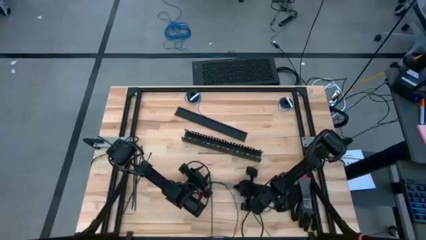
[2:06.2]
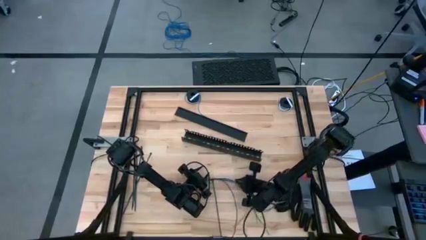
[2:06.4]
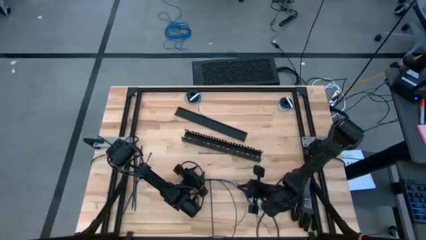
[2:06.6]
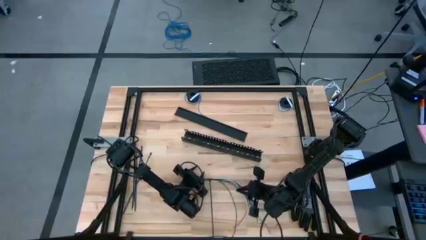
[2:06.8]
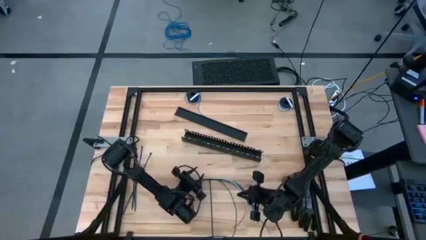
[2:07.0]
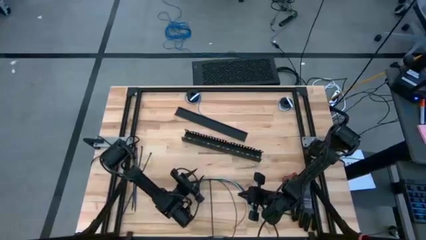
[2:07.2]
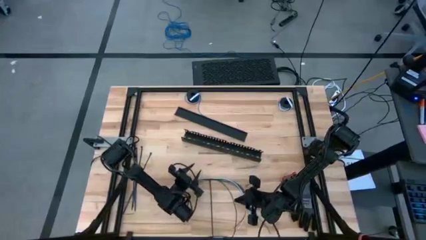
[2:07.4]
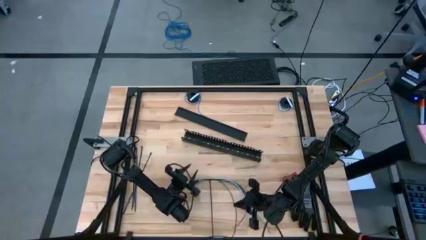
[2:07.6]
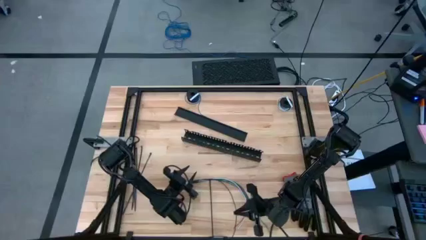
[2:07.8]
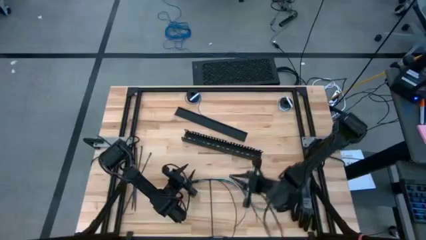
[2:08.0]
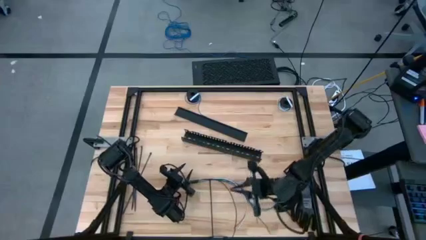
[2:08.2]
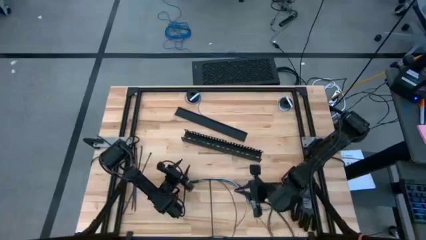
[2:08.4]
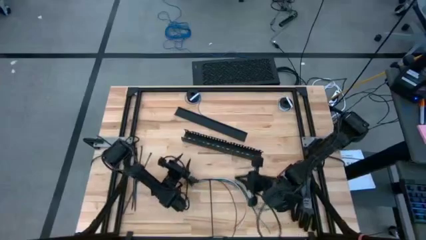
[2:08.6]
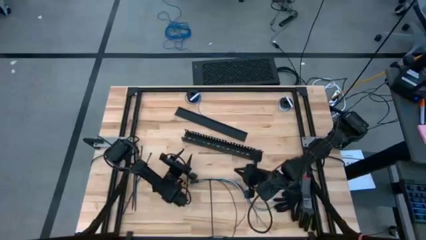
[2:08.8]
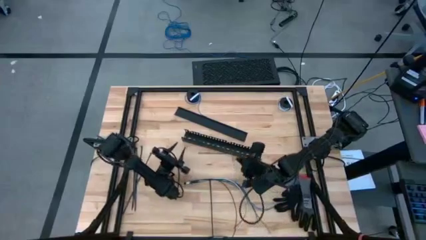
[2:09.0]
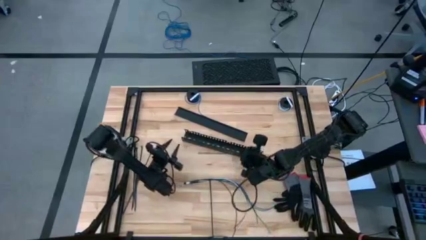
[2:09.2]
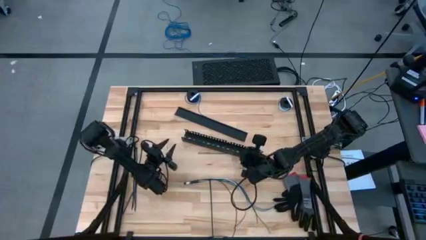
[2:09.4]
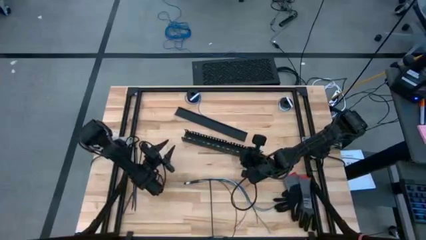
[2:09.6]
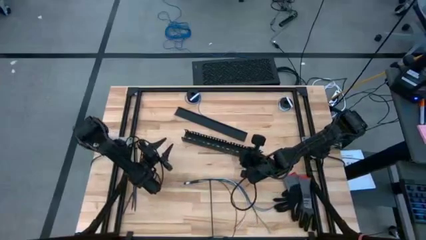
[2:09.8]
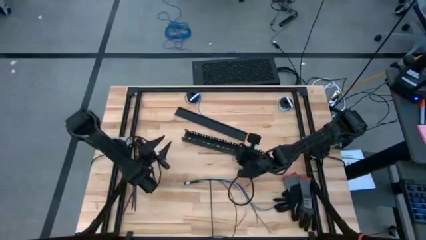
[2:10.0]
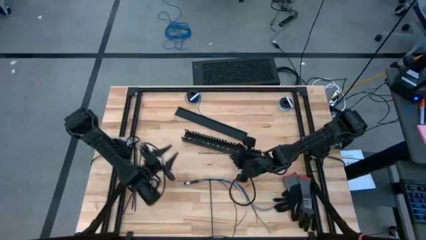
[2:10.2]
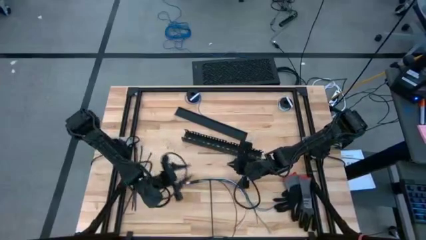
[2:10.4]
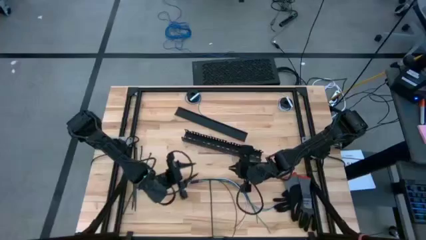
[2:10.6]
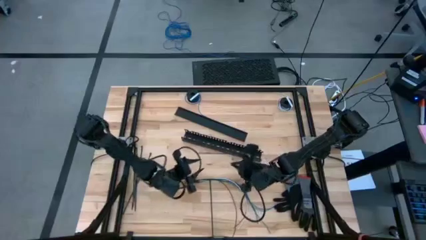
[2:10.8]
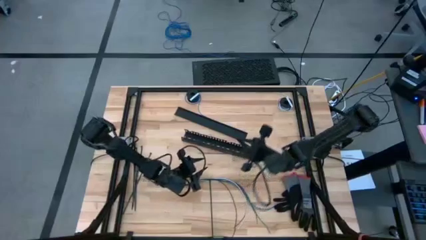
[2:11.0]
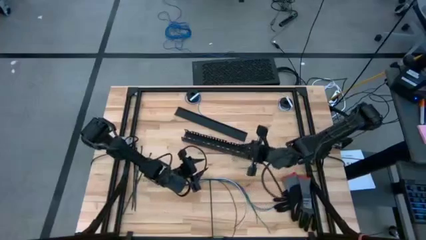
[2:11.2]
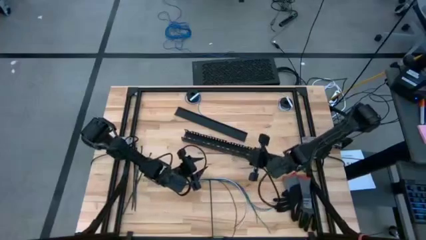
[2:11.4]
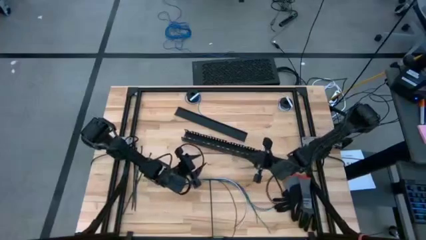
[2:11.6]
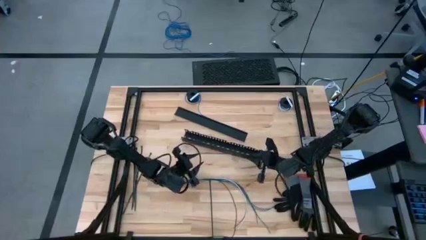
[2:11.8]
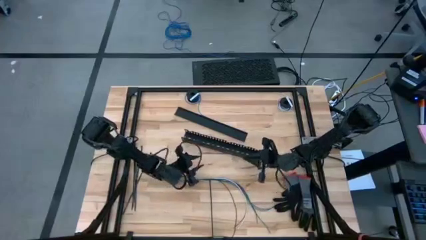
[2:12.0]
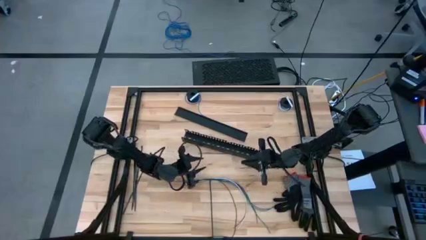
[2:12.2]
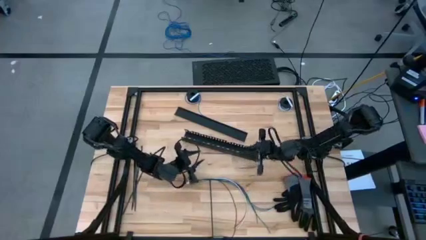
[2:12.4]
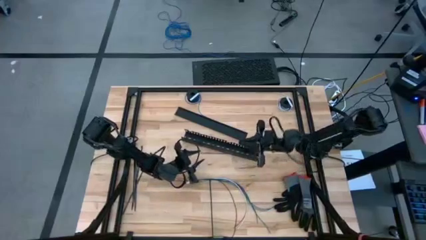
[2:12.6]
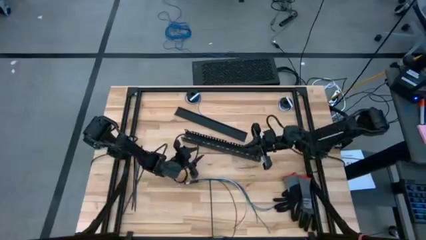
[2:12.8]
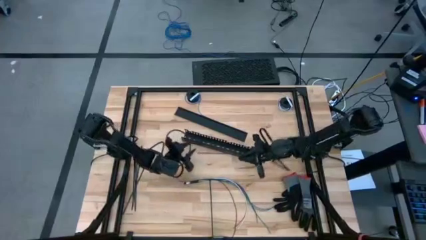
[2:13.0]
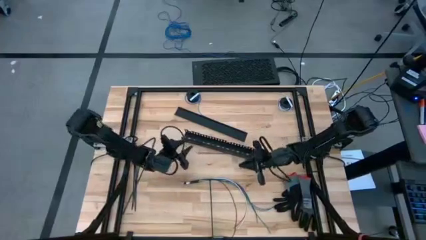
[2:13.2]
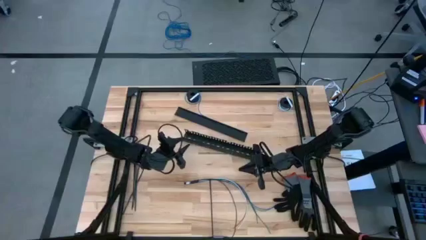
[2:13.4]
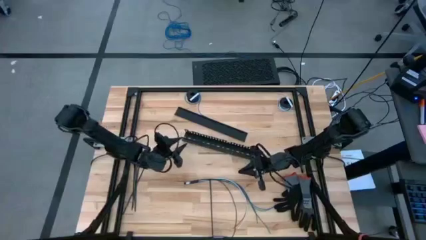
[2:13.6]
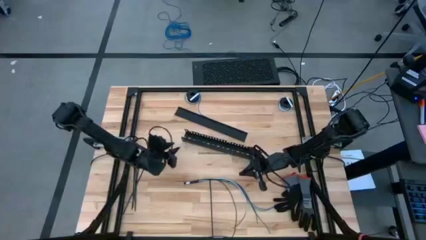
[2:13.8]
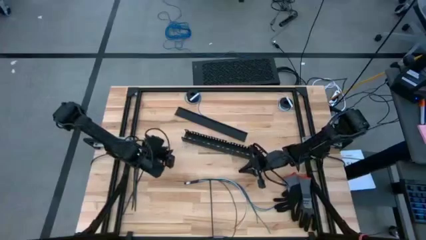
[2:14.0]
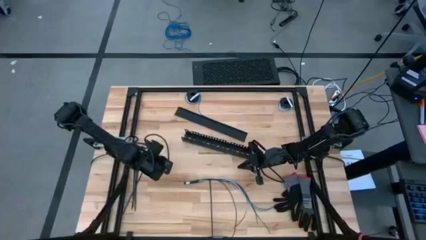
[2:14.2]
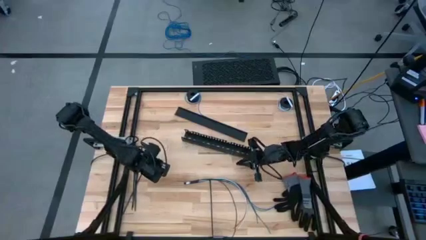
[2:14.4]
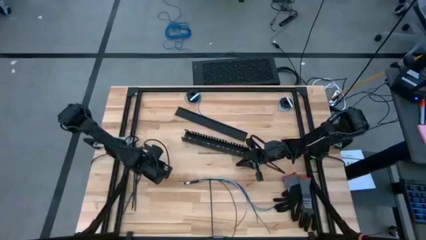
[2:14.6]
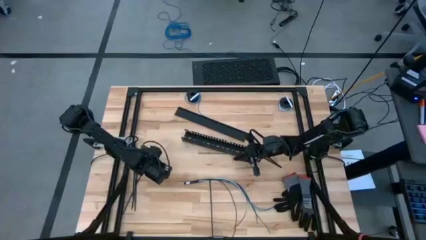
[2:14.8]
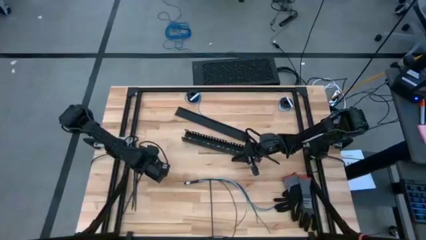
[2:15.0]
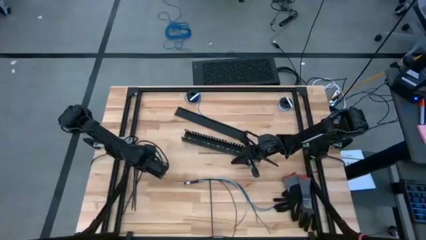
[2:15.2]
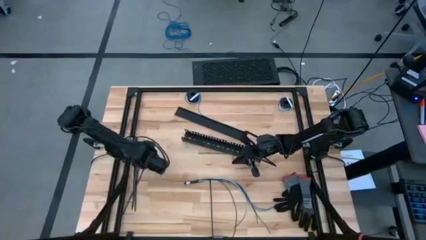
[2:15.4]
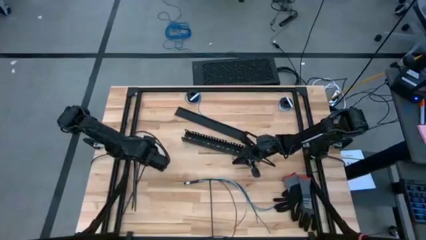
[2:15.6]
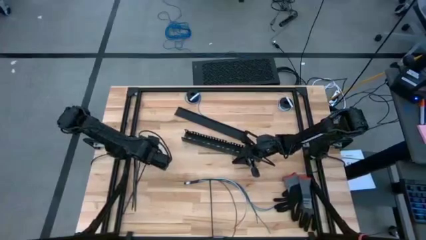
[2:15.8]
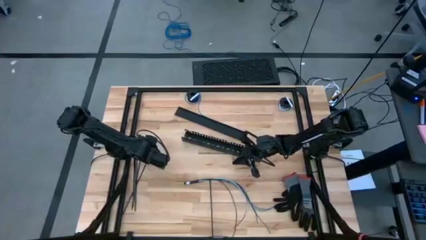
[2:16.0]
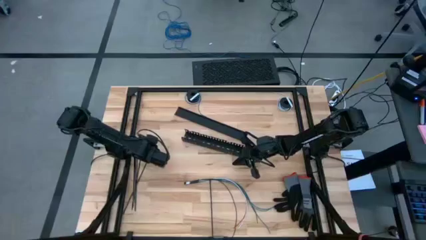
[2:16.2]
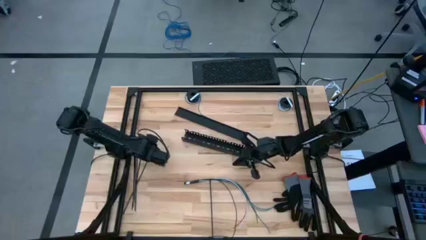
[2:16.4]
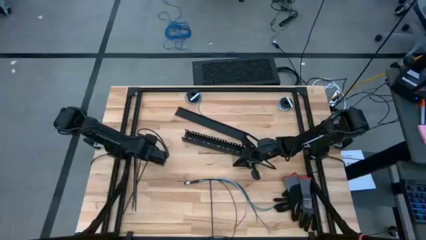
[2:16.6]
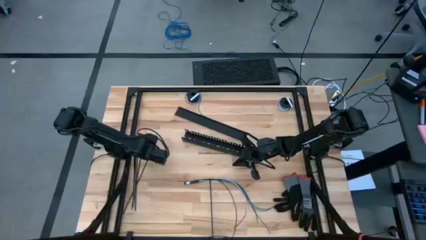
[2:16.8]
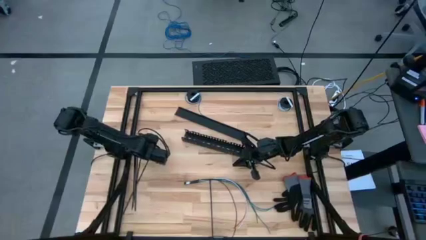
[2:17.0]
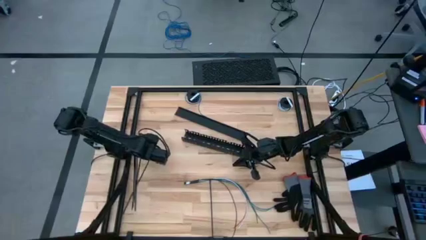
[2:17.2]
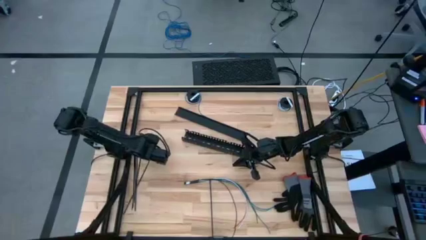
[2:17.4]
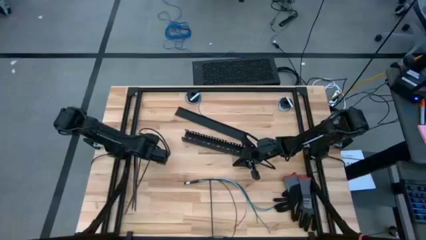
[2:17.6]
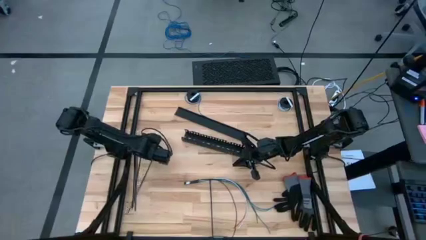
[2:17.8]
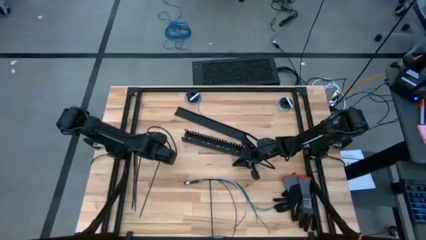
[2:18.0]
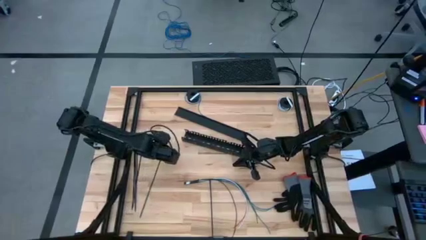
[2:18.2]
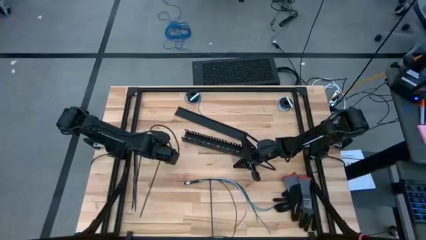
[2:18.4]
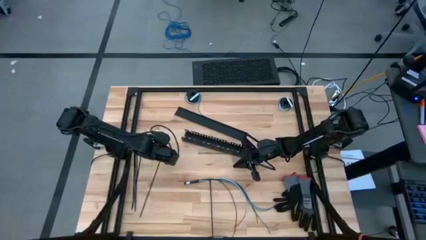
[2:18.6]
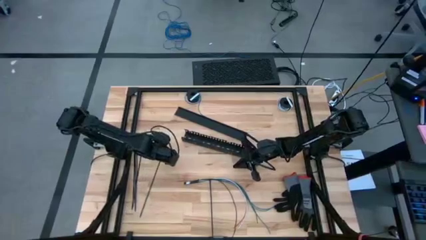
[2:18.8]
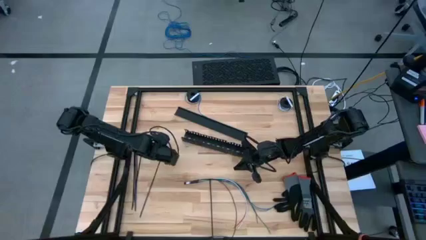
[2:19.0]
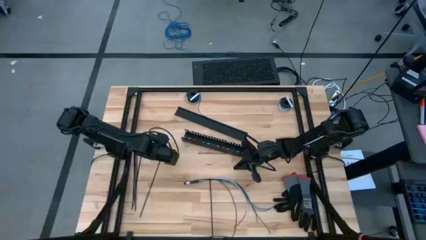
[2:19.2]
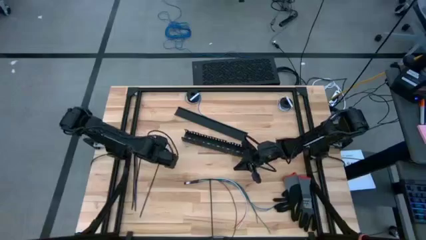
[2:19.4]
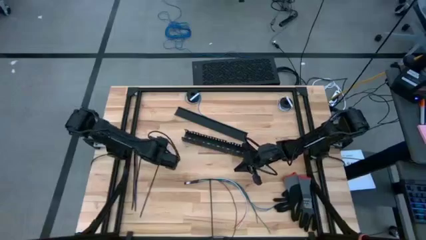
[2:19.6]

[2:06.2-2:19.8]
Task: Ziptie cables
Wrap the cable wires with the black zip tie

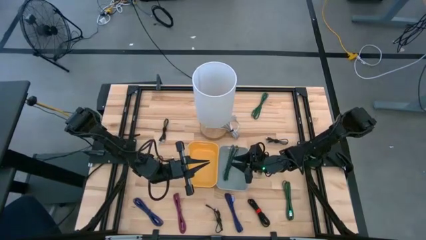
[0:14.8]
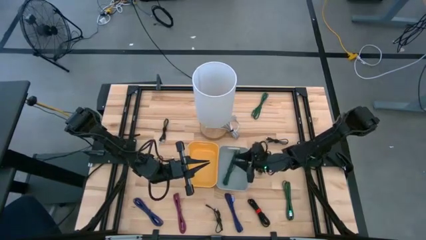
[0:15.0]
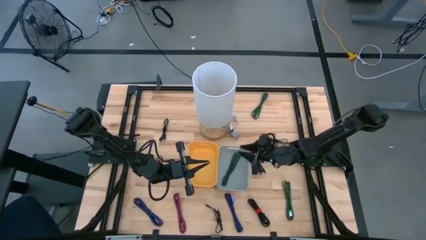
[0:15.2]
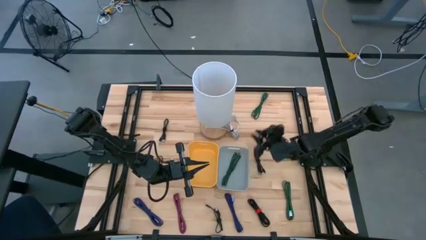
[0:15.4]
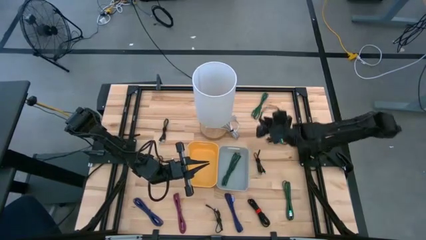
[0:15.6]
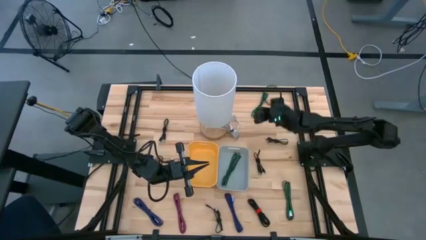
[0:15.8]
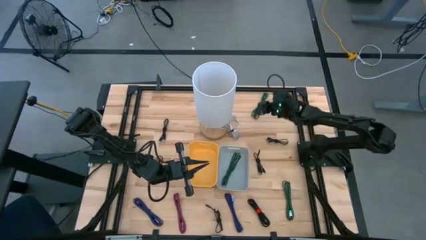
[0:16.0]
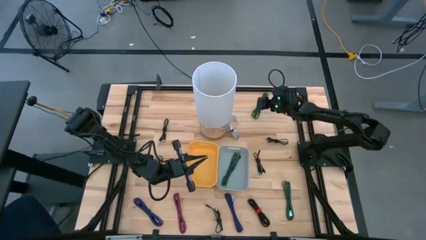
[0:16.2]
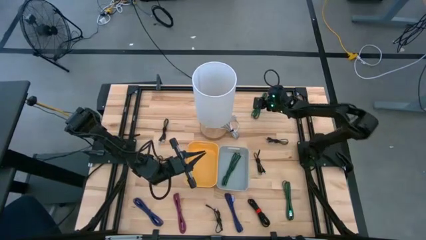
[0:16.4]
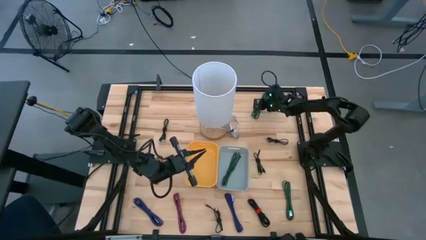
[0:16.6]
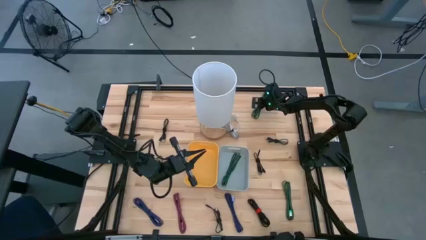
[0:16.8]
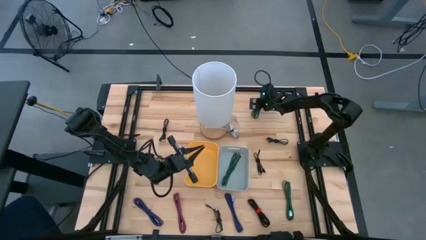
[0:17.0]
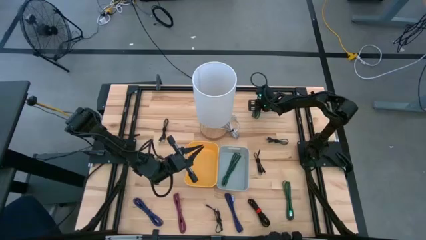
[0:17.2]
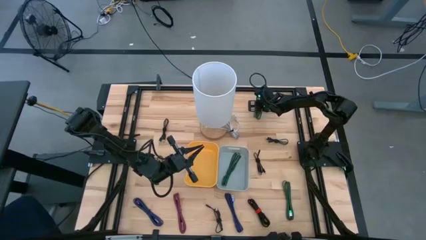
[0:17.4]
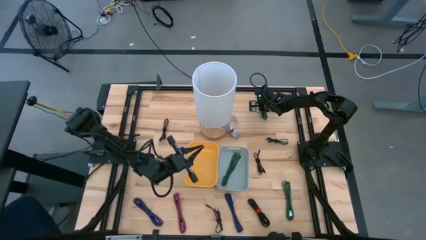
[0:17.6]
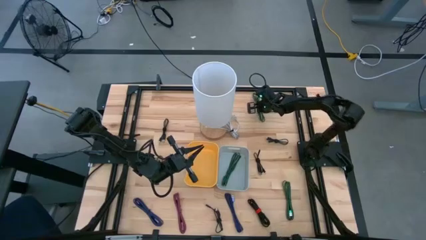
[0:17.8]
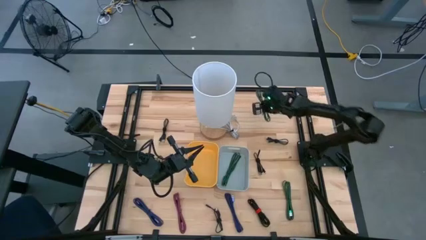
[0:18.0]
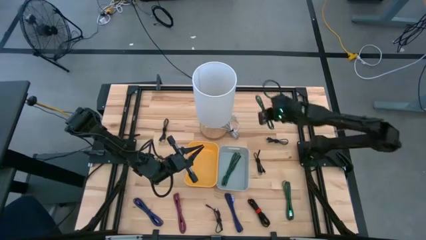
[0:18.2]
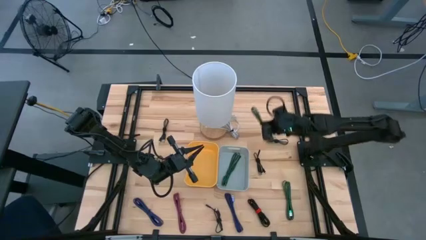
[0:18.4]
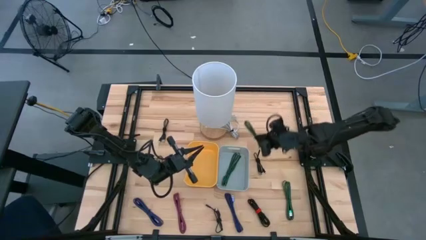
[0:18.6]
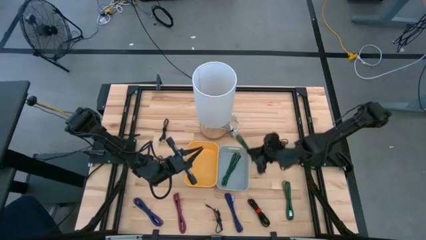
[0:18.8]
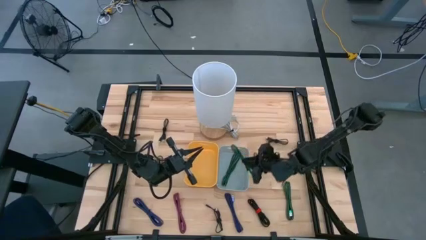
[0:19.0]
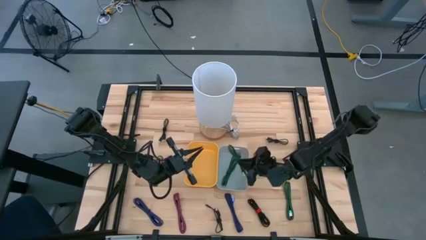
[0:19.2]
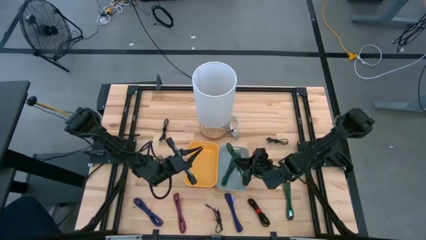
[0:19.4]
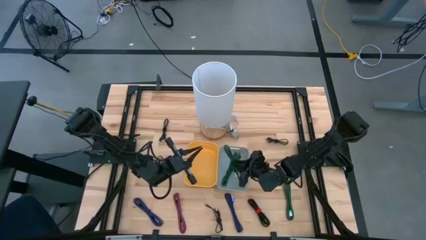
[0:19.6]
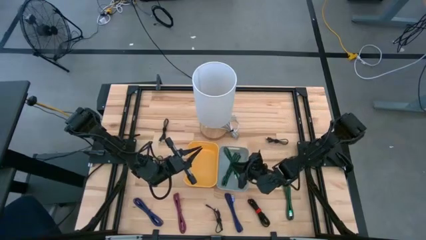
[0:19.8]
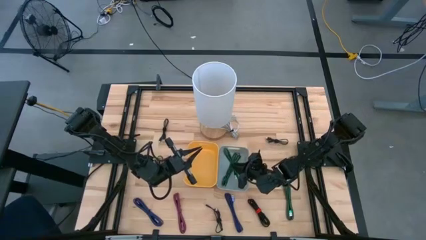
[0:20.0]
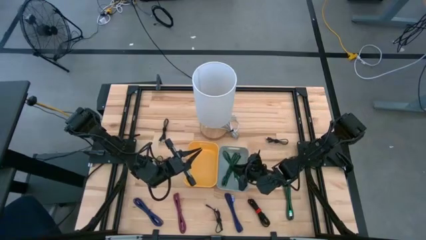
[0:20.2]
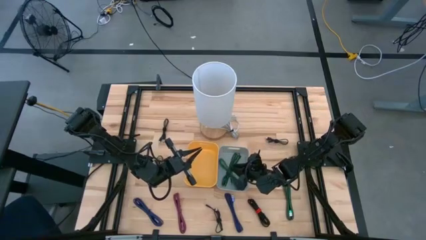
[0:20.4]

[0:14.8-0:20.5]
Task: Pick & Place USB Port
Put the top green and black charger cable into the gray bin
